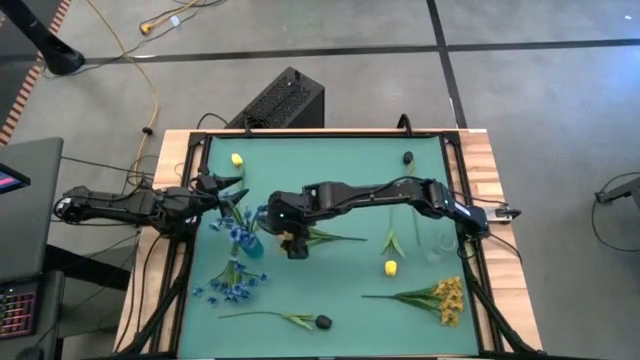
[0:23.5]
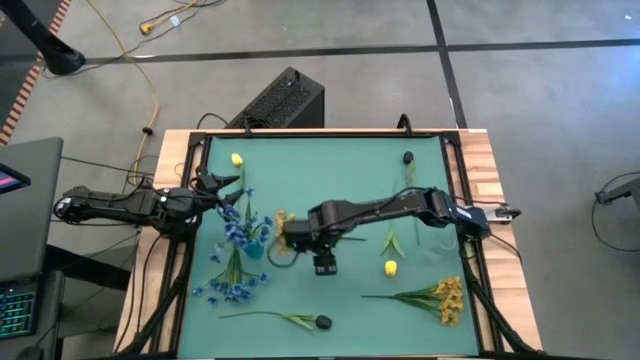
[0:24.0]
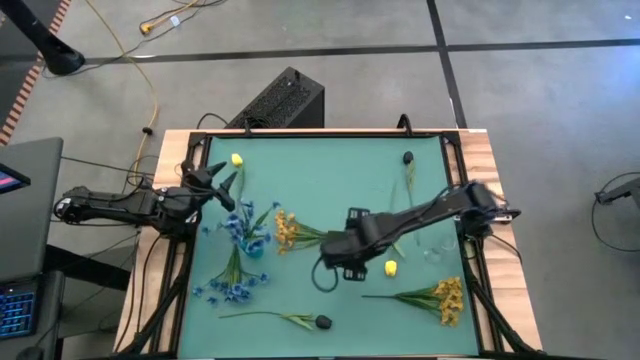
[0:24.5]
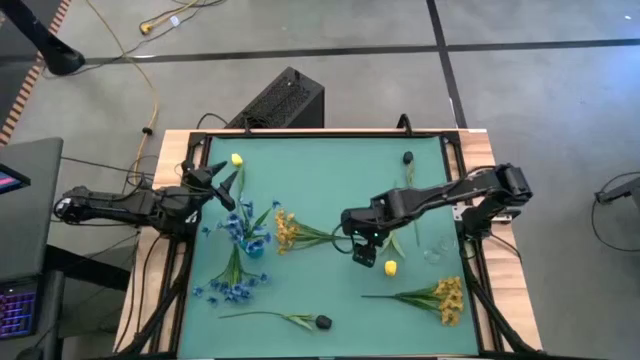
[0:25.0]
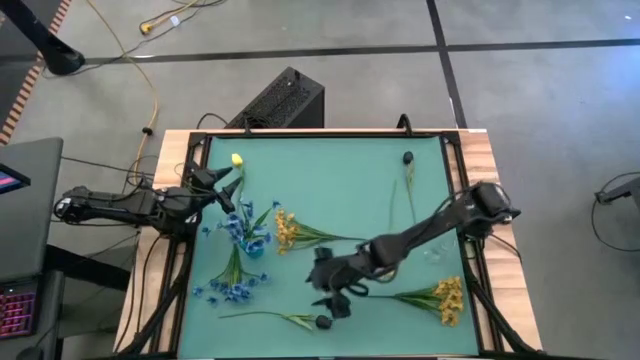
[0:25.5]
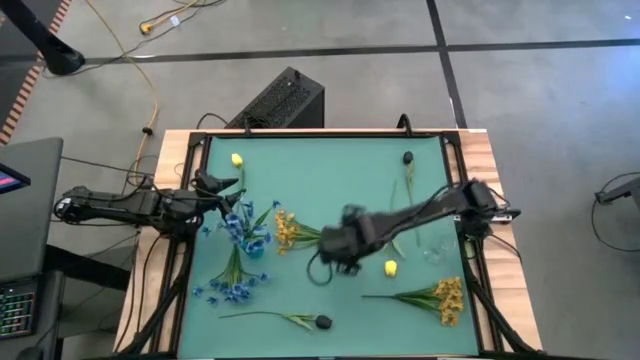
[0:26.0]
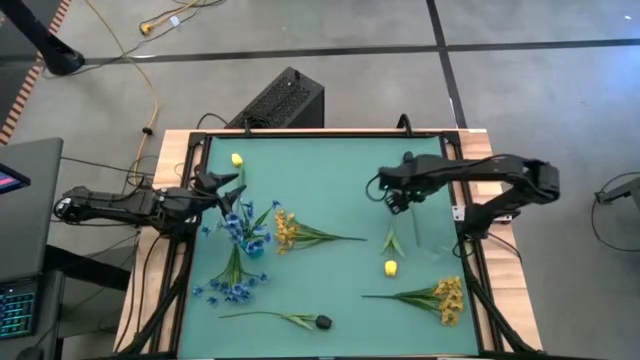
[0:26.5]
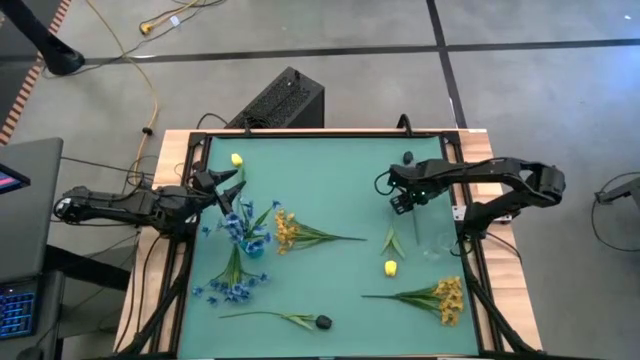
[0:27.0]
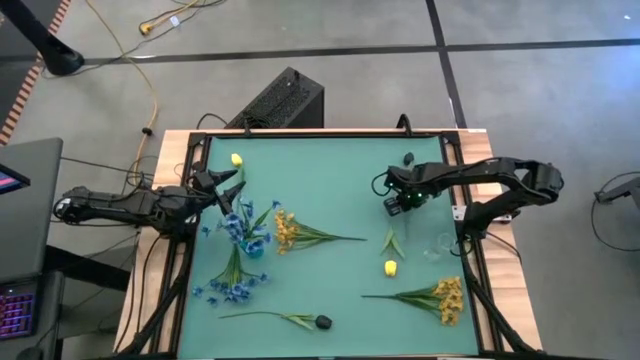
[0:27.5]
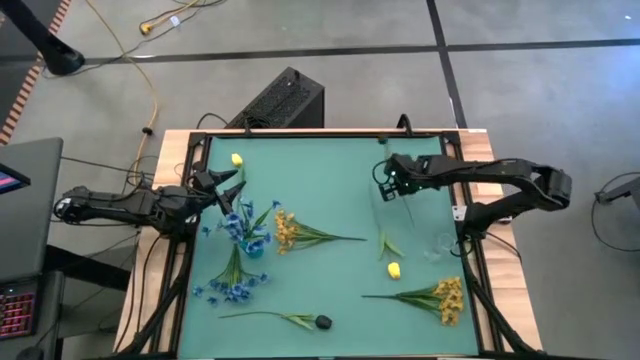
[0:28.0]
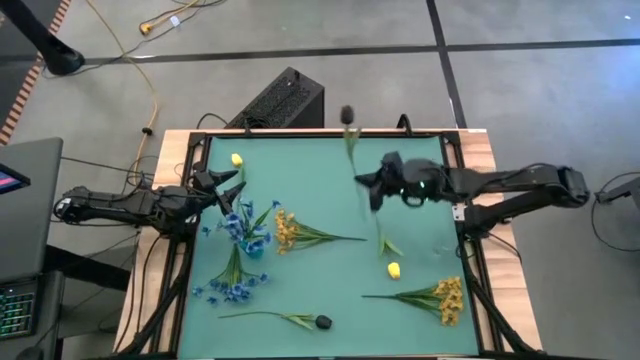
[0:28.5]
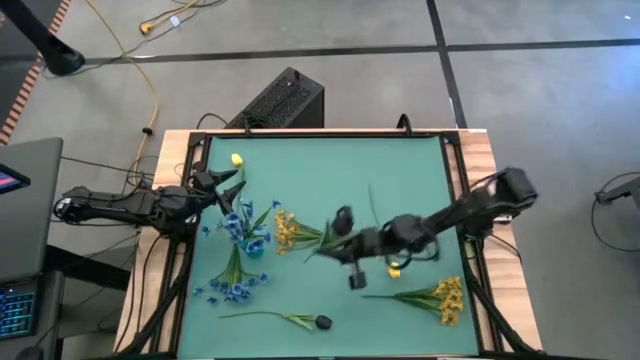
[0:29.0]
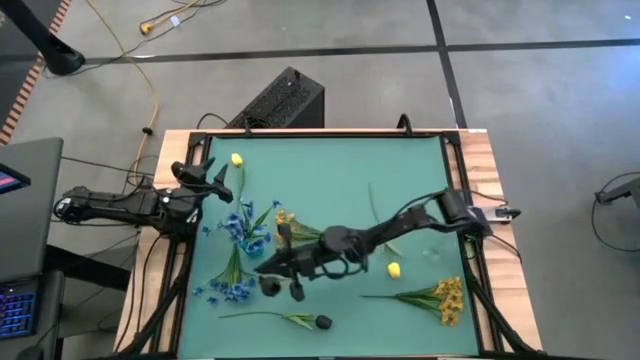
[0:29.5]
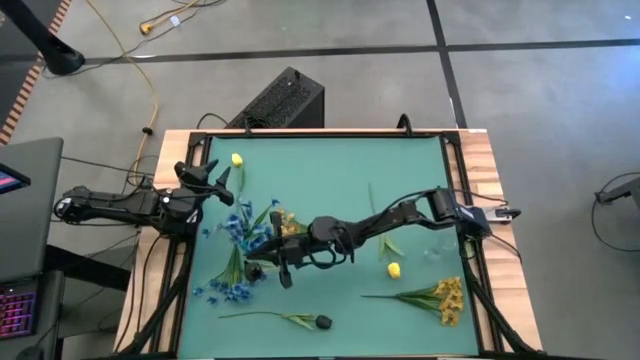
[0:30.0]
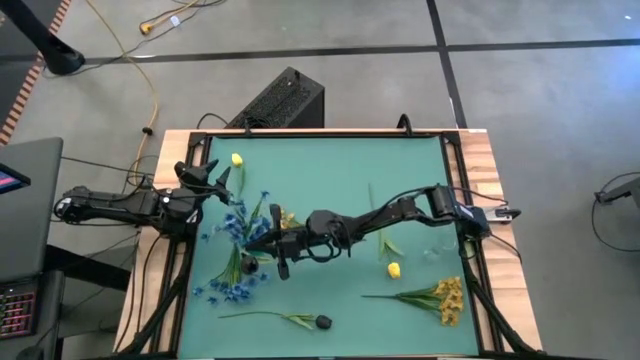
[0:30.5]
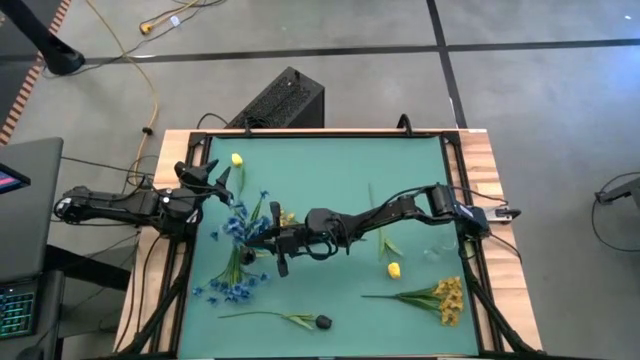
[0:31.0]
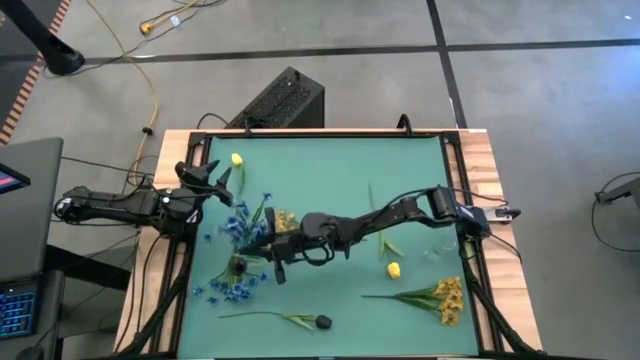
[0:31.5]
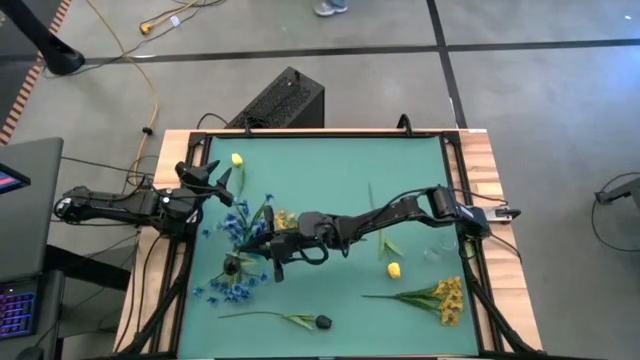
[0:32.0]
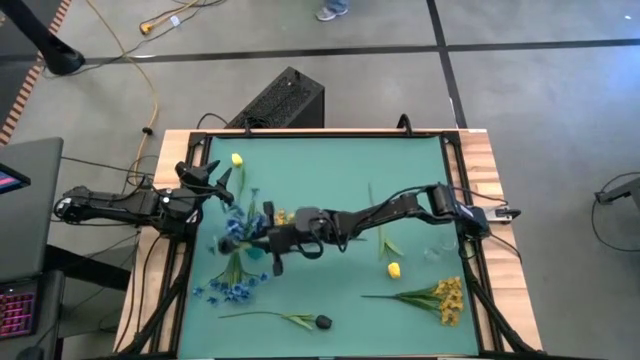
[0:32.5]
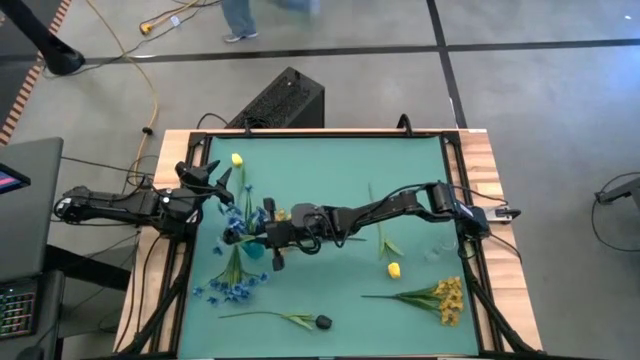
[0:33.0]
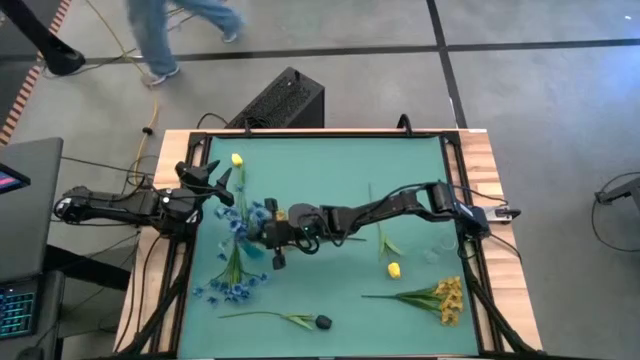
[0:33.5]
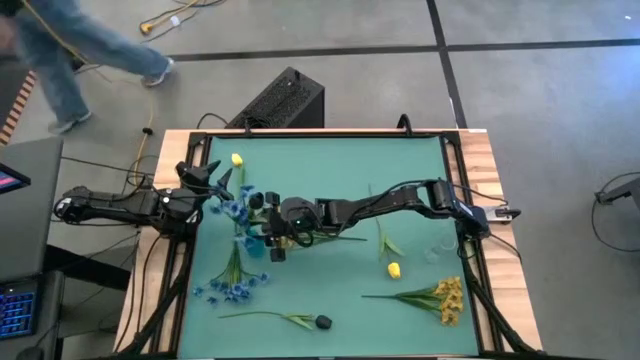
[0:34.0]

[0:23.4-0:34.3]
Task: Sort flowers into vase by color
Put the top black flower into the blue vase

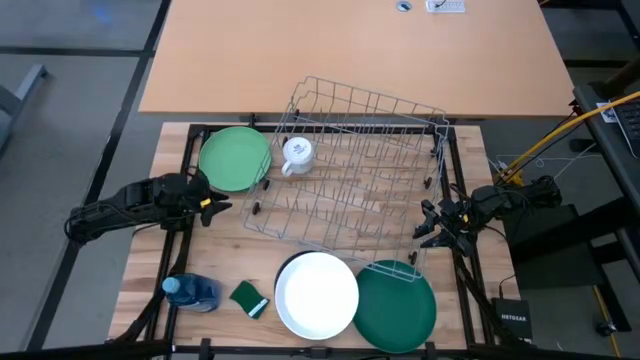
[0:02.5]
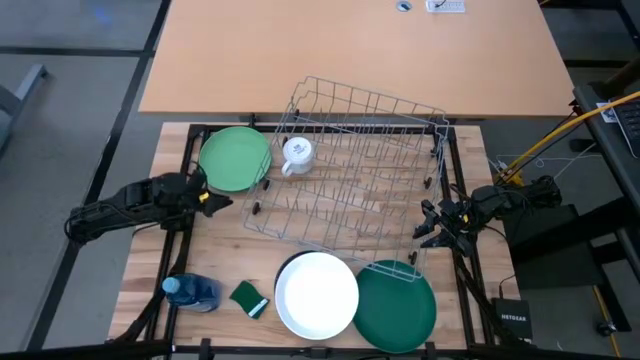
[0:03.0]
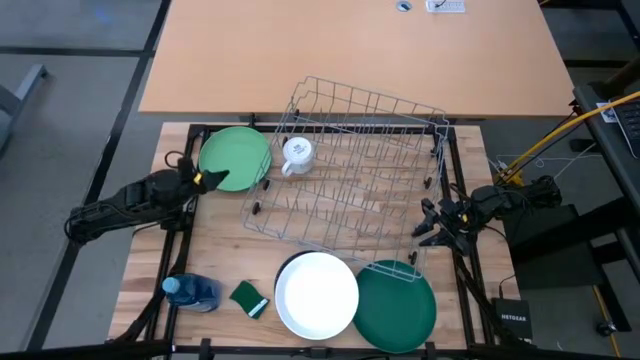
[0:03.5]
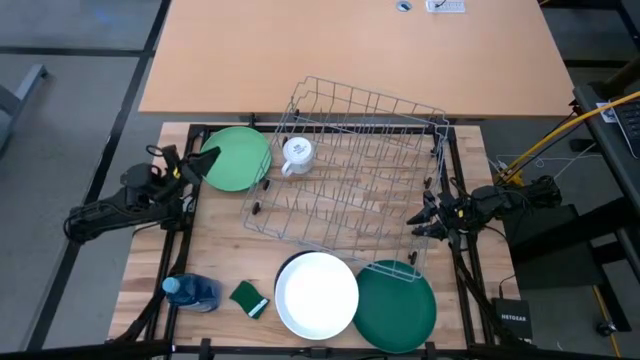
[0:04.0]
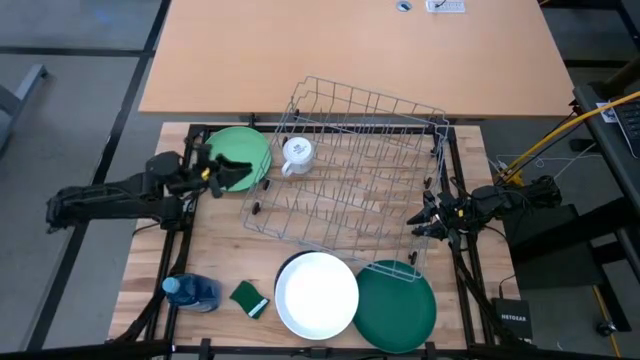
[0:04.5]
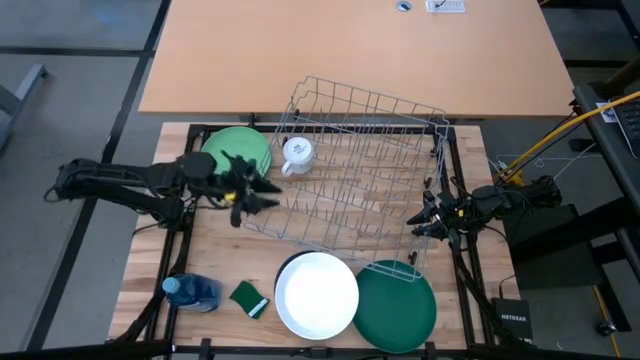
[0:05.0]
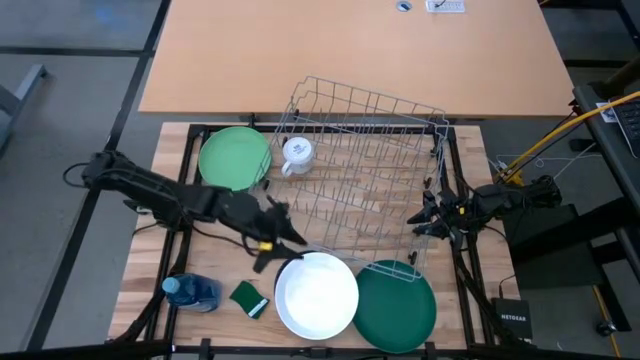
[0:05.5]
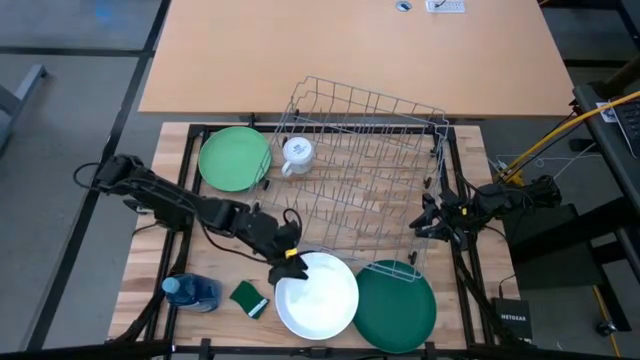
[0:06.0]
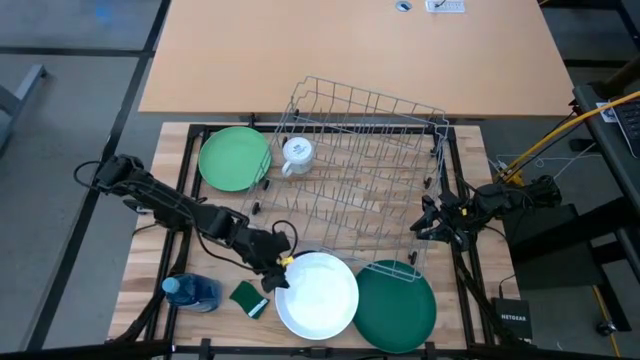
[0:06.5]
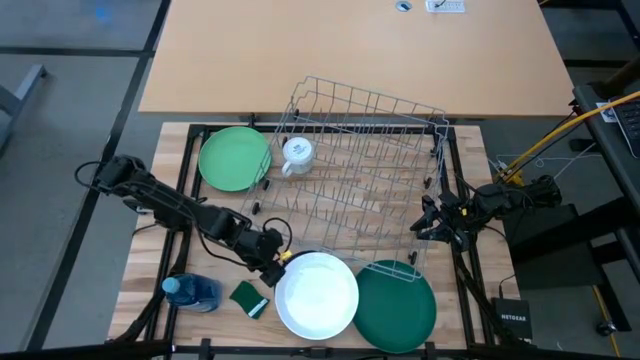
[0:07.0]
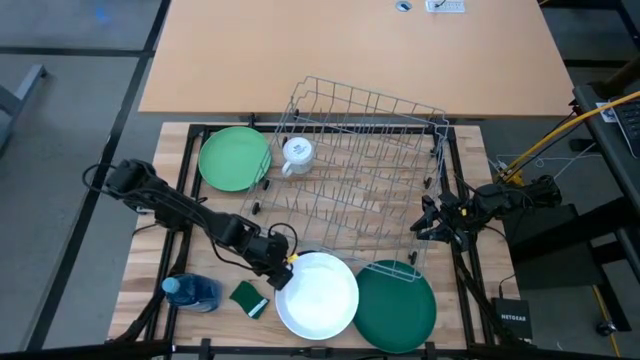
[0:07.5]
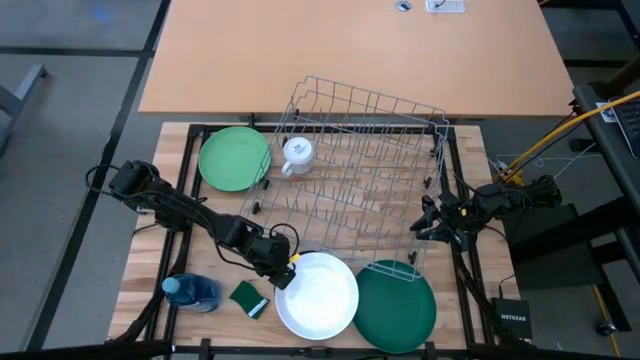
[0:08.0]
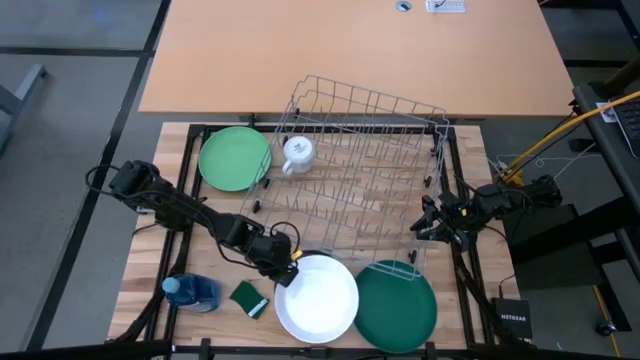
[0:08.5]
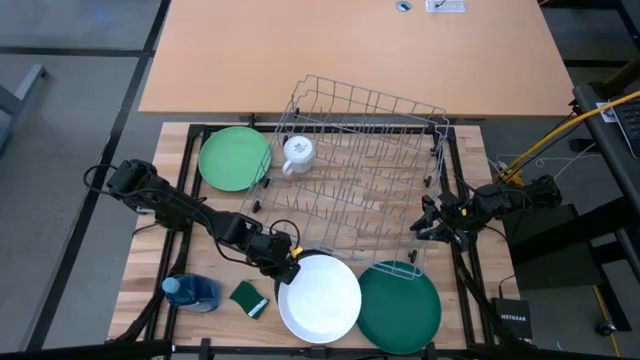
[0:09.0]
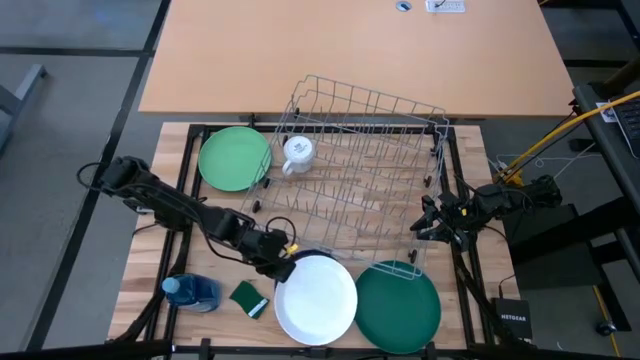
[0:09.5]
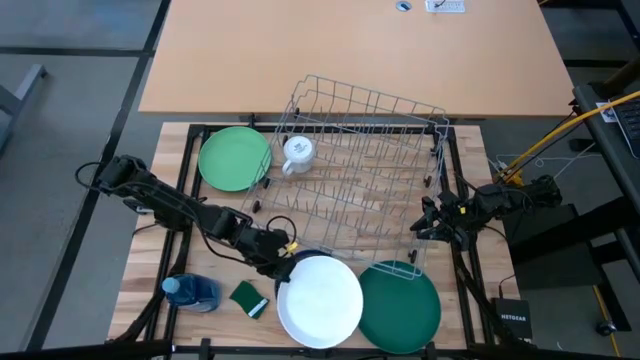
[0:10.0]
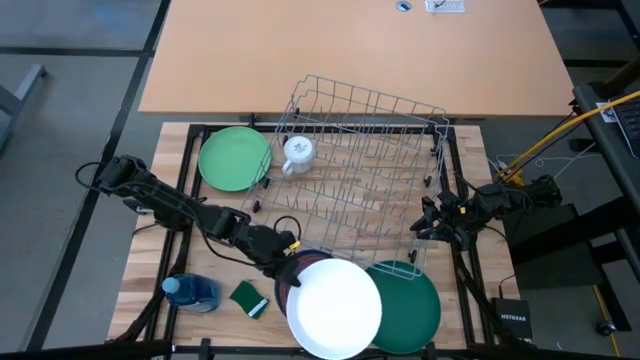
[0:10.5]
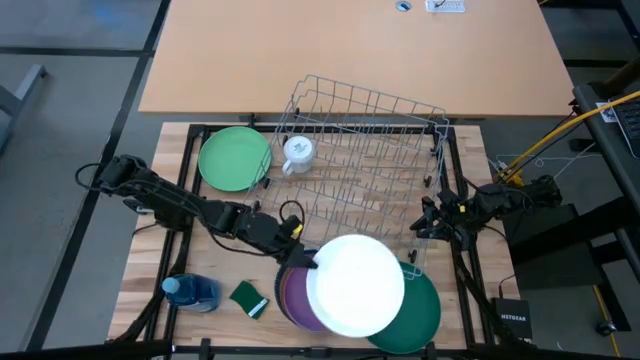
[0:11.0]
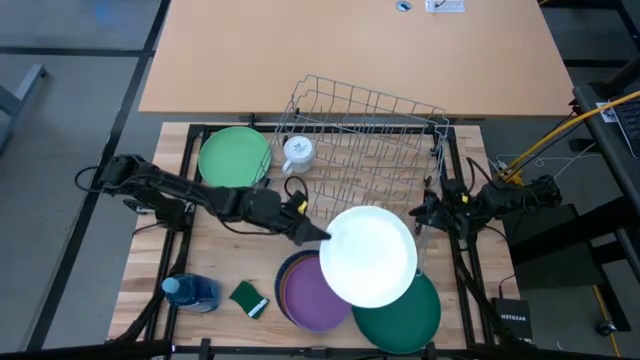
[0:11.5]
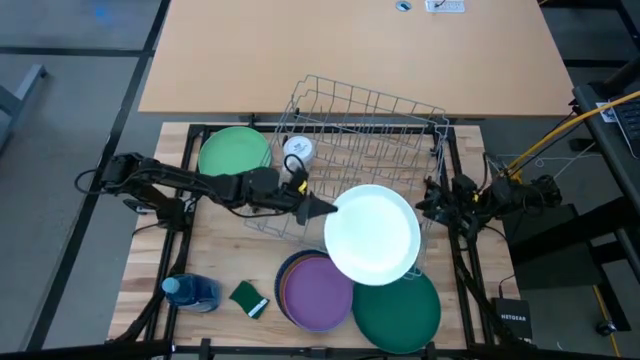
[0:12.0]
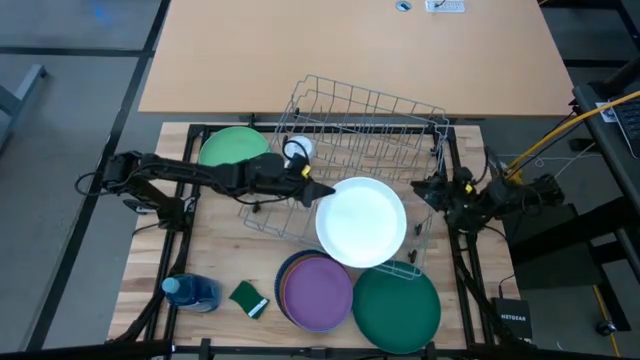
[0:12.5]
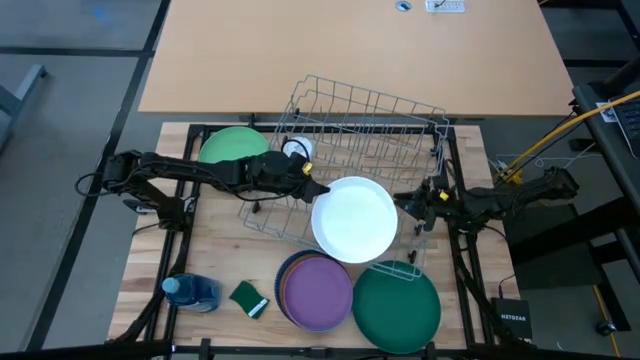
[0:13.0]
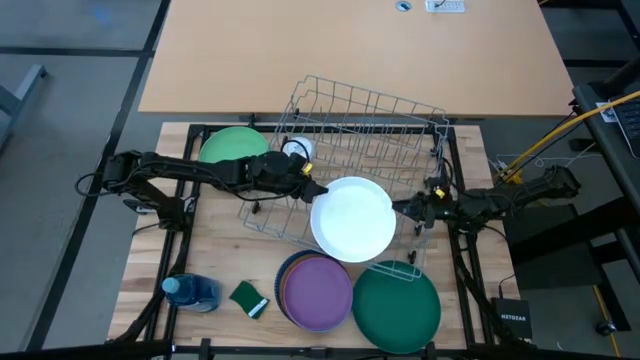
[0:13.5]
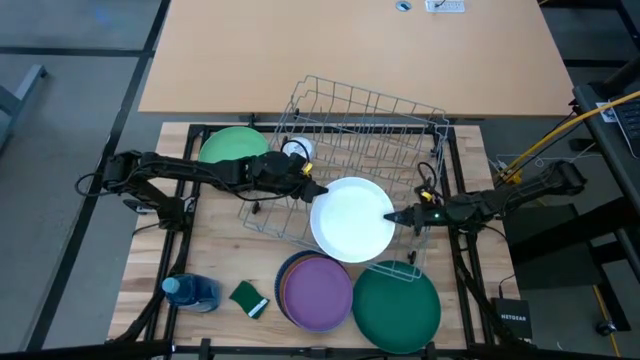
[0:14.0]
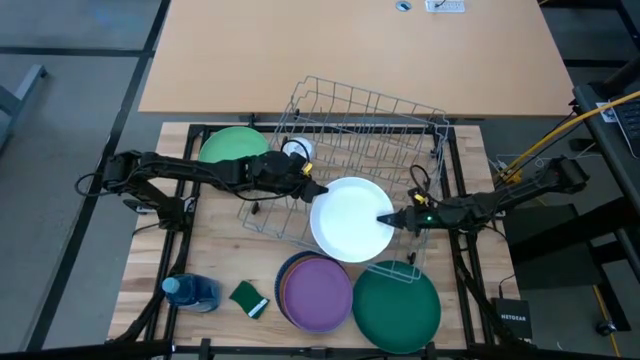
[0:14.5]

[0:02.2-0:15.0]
Task: Sort dishes
Put the white plate in the dish rack
